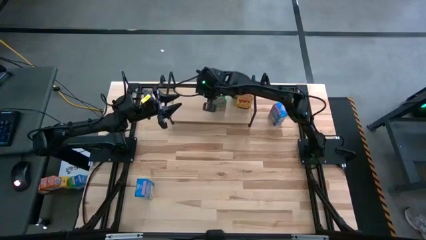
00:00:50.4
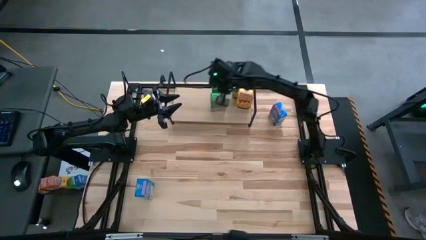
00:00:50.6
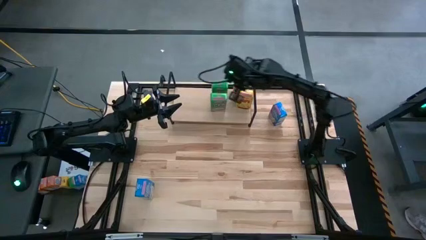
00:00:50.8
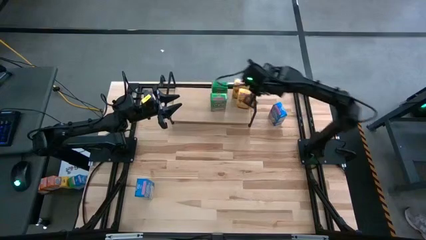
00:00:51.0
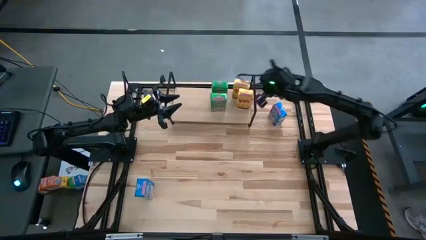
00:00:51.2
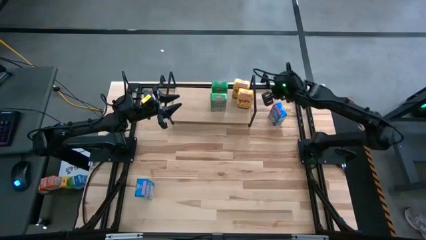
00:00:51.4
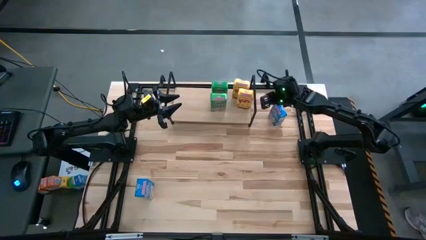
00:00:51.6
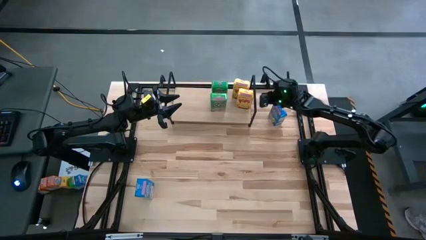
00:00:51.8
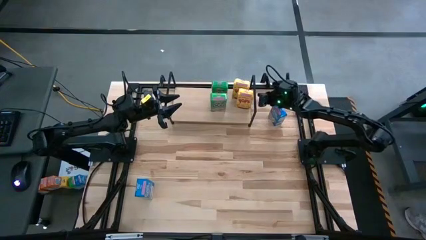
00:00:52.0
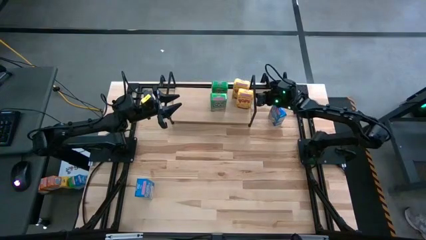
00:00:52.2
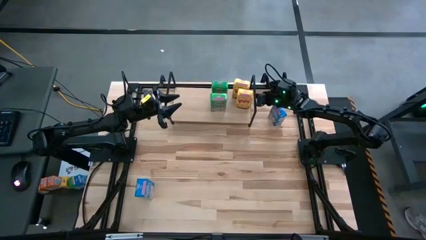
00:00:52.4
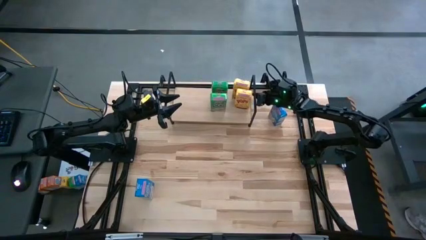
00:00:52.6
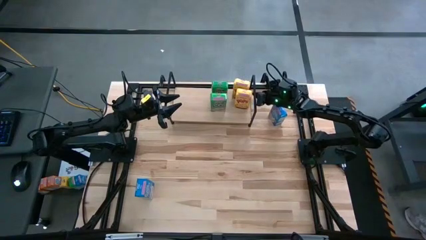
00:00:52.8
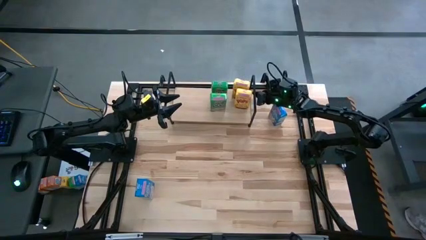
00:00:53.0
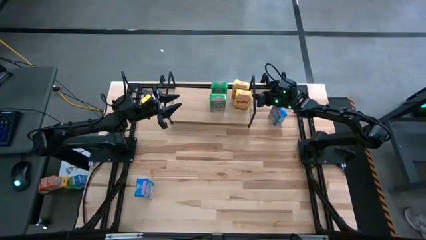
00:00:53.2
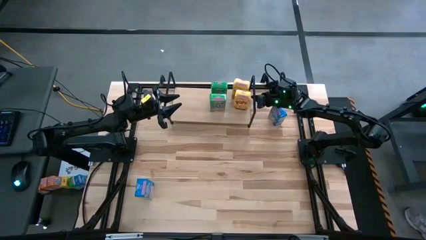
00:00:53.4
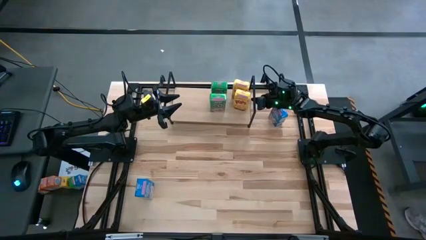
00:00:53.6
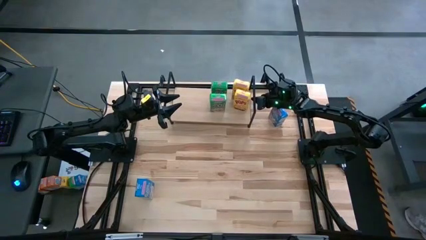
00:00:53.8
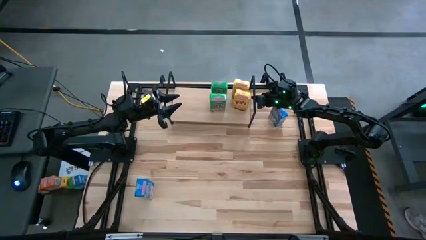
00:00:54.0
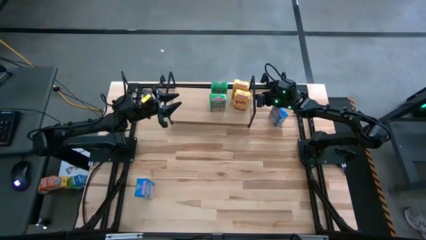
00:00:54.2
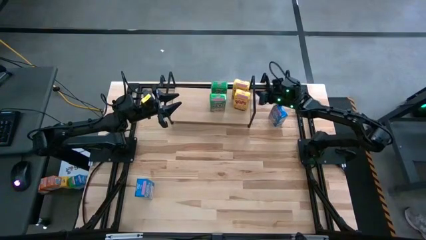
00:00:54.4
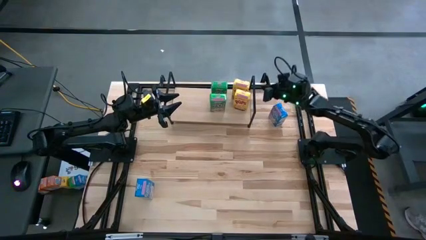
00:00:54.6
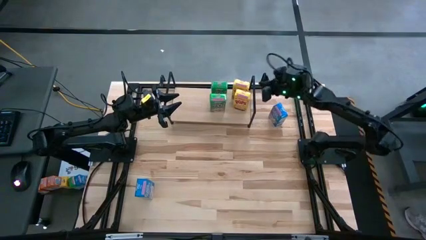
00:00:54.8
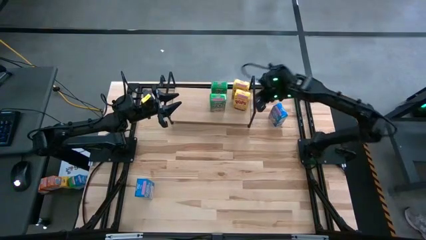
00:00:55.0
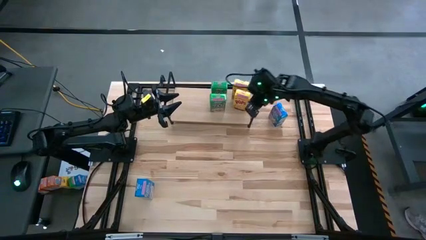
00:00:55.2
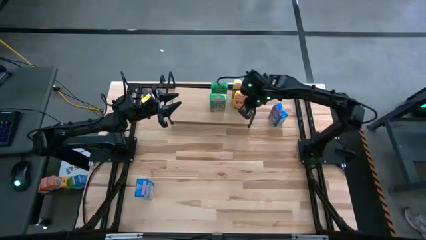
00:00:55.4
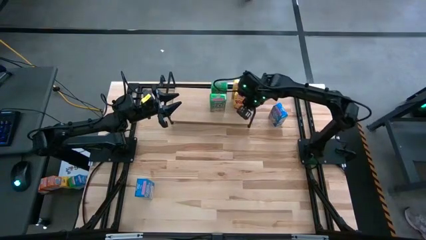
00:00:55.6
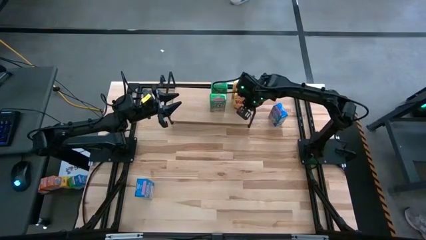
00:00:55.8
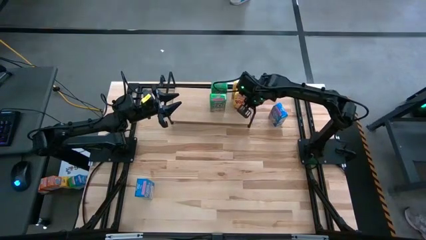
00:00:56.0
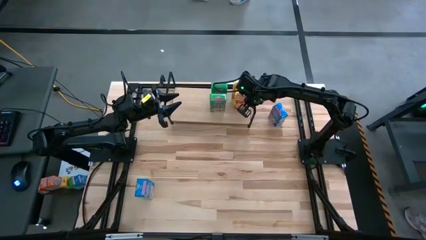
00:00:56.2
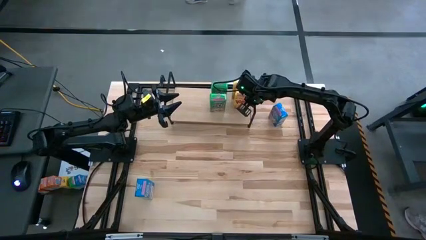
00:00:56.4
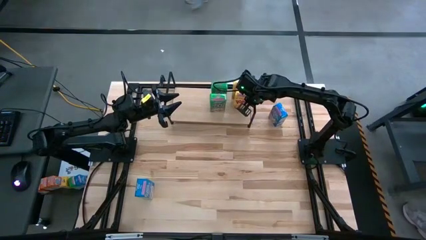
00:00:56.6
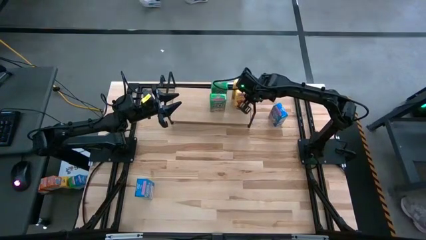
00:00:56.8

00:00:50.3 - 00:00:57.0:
Task: Stack cereal on shelf
Adjust the yellow cereal box on the shelf

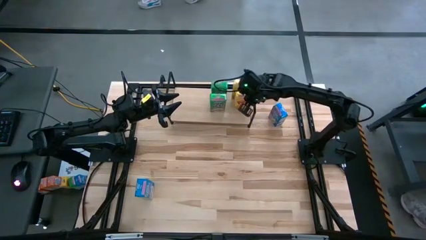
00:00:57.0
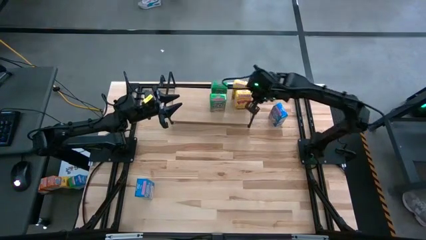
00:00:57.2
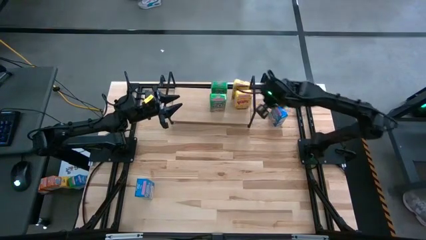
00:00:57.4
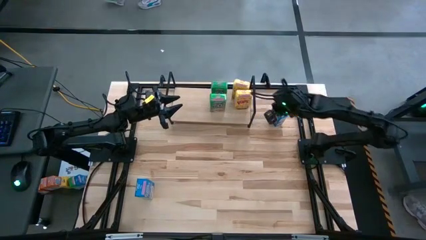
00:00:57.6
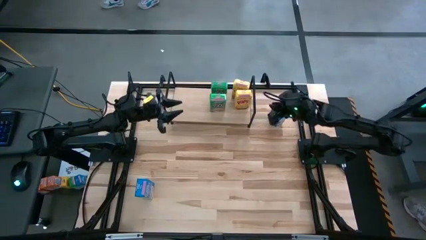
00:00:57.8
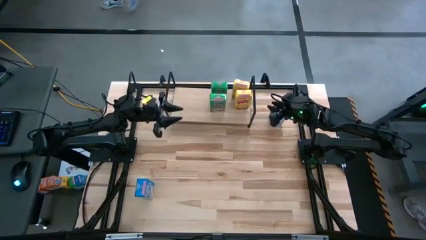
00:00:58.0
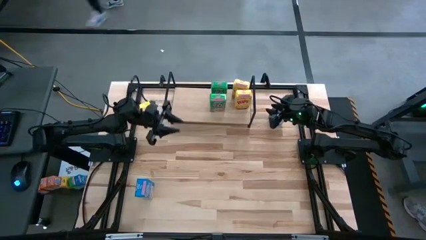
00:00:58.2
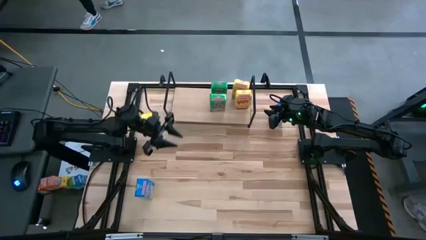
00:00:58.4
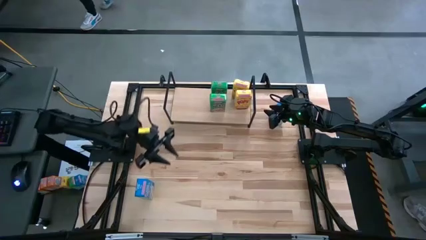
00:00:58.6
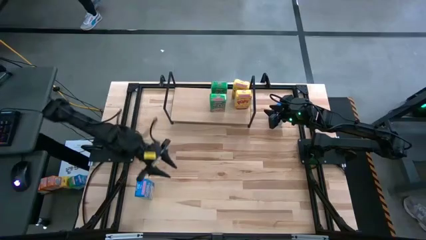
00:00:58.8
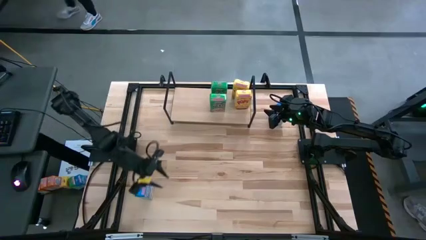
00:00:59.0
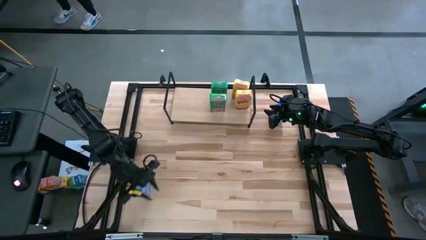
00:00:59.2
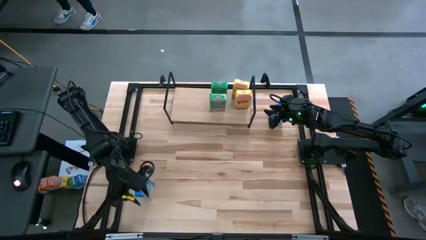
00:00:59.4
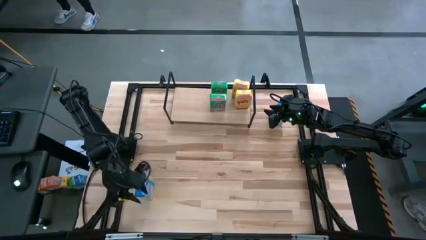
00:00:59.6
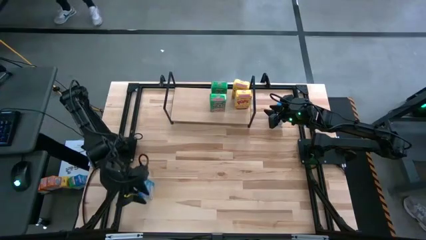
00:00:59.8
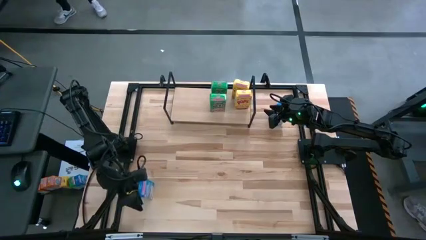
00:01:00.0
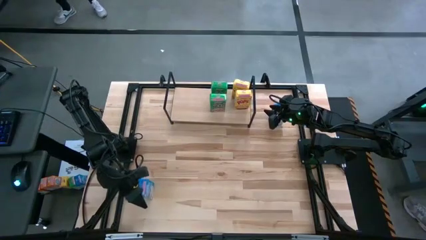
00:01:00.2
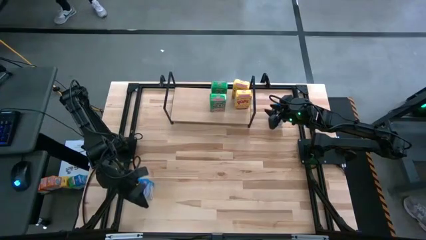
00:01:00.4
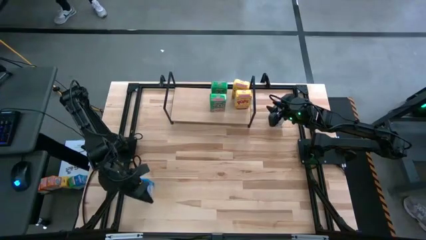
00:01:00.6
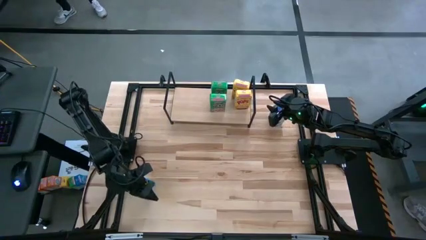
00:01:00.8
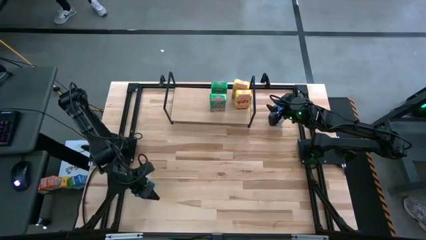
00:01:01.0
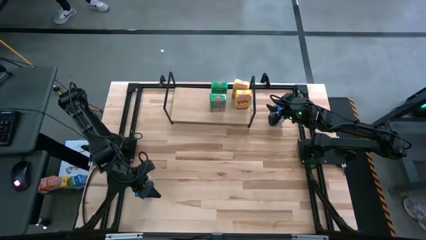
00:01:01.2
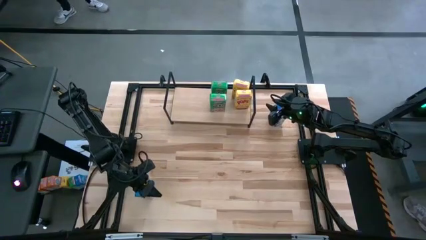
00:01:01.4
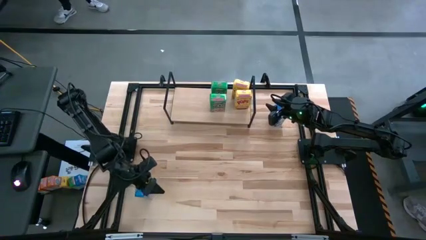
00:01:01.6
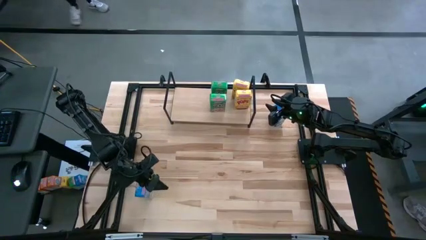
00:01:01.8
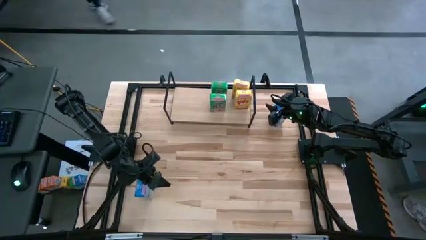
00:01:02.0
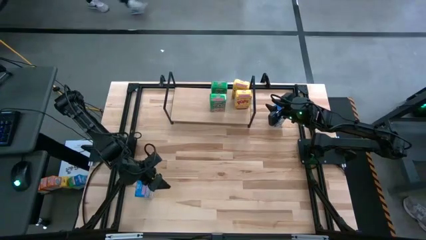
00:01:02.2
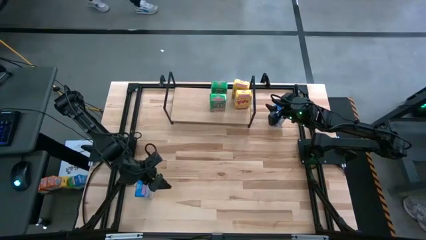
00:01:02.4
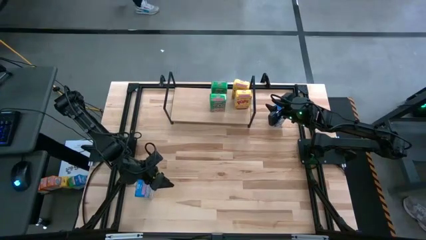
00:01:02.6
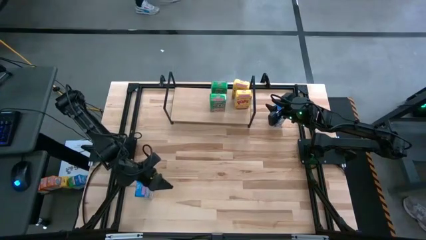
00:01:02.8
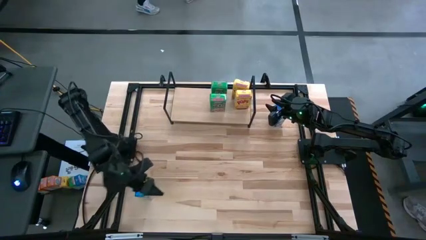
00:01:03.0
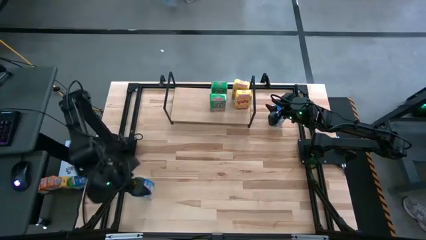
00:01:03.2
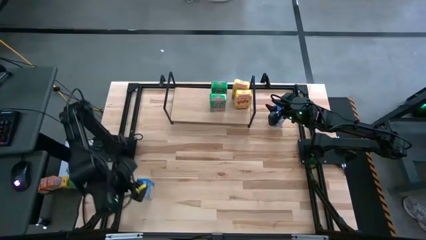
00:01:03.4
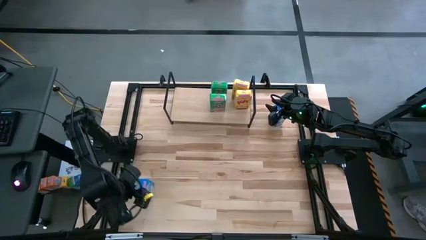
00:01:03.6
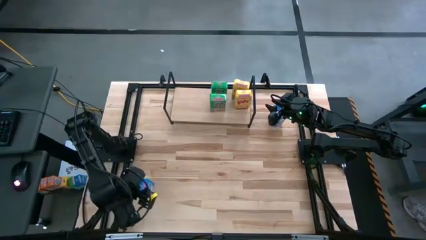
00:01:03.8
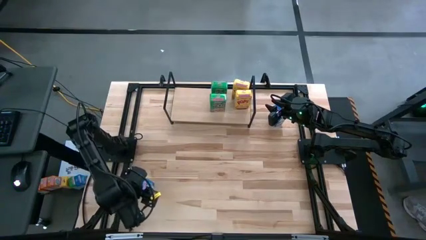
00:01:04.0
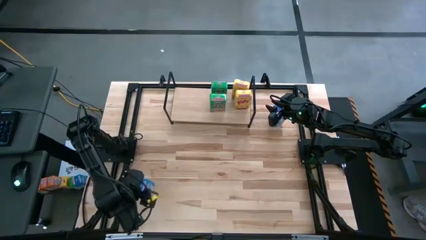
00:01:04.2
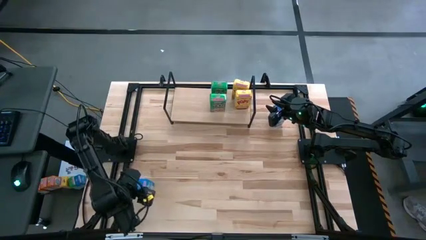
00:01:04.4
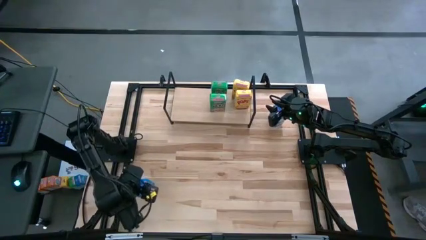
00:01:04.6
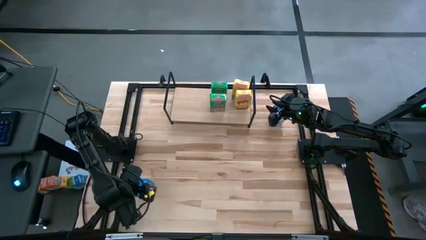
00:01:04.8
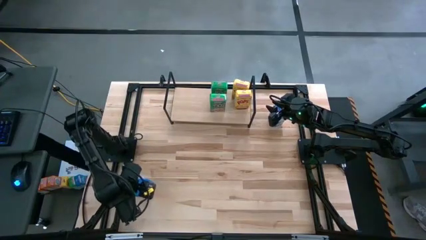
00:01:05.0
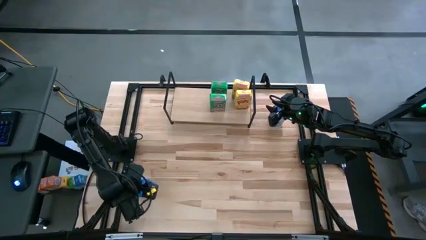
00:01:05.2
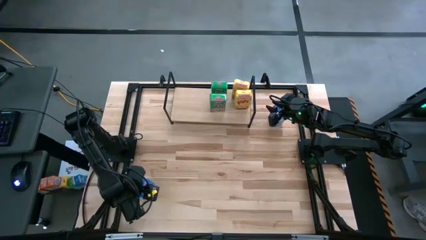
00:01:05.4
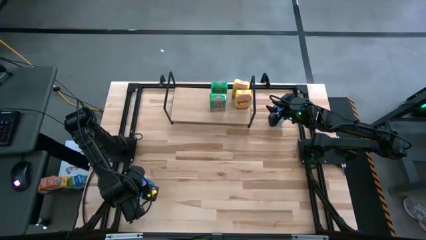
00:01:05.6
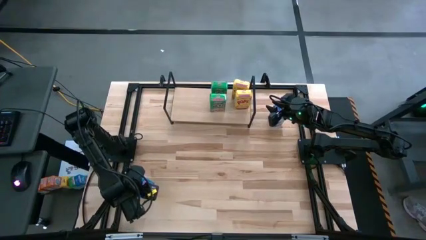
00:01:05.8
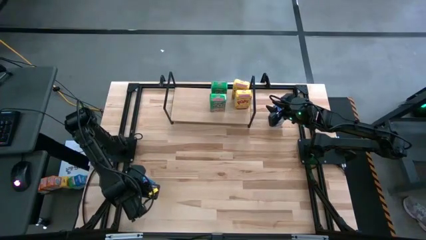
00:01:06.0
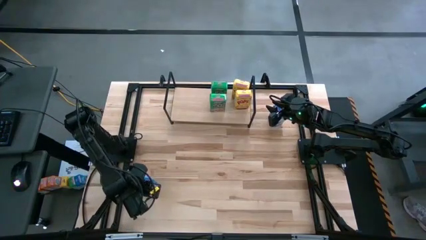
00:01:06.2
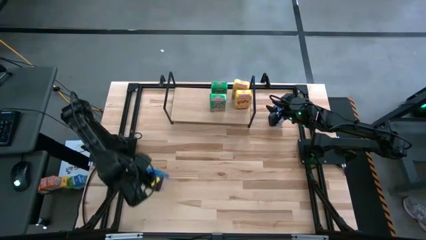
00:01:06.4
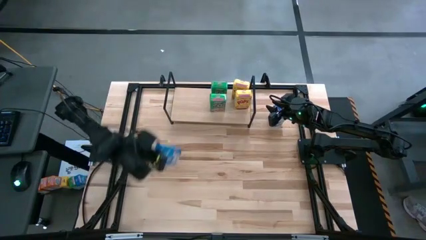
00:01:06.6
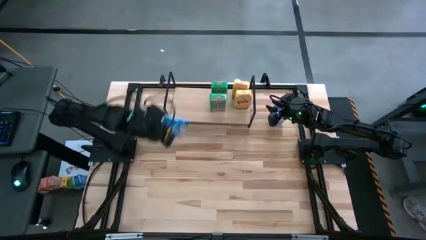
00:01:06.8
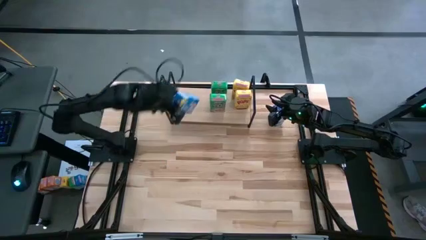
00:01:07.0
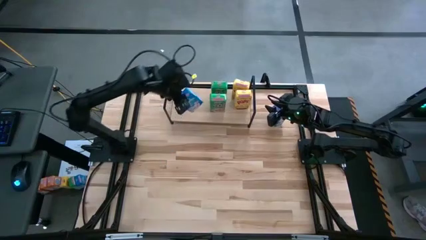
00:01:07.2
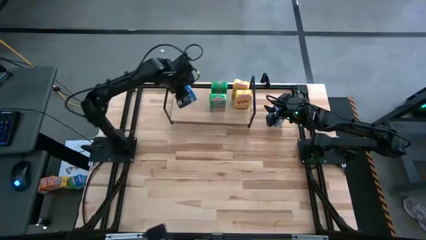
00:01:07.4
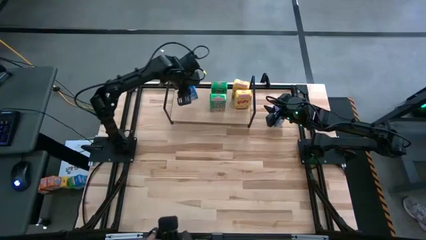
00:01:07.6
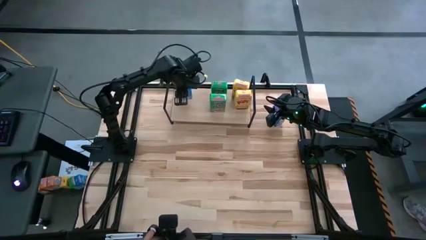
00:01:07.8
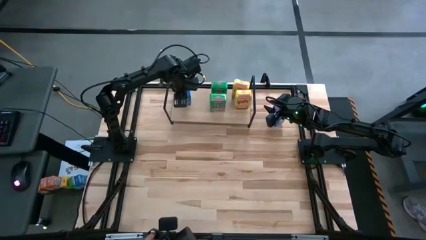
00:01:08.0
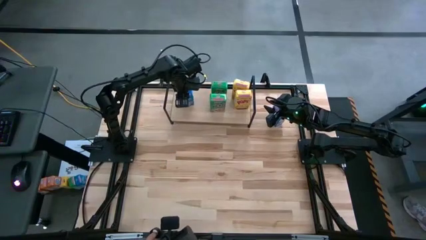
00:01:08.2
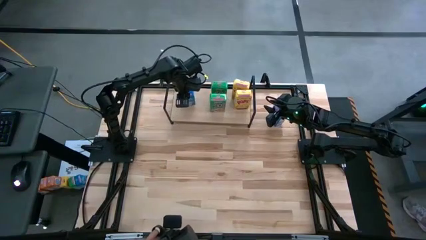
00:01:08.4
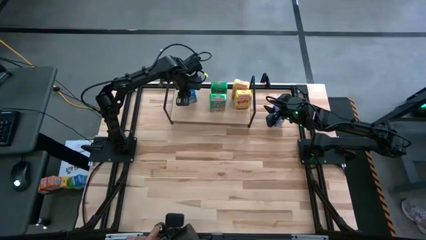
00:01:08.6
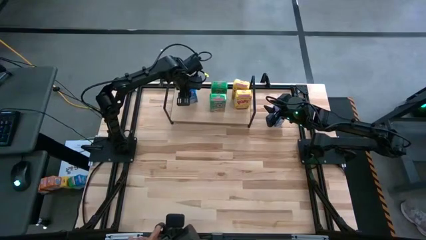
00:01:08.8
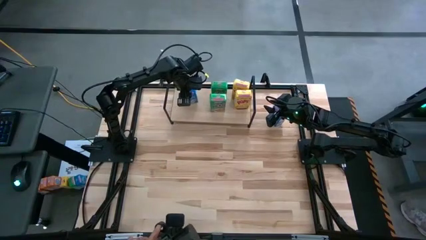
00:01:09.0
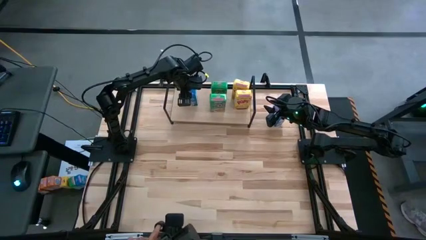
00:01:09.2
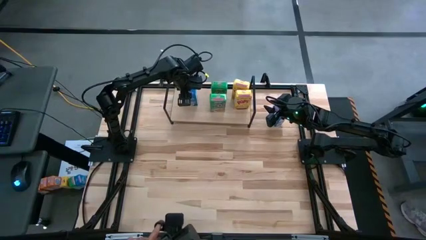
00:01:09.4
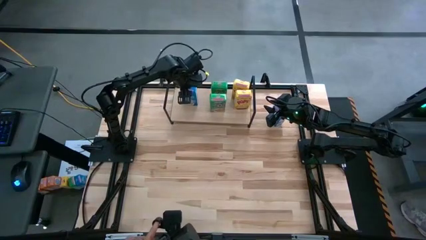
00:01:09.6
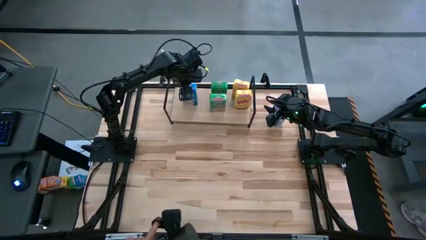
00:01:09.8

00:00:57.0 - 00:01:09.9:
Put the bottom blue cereal box on the shelf
